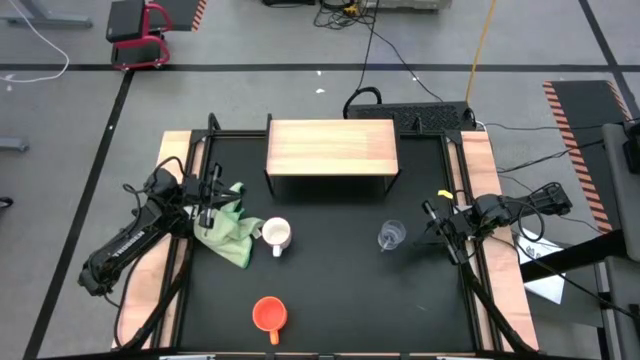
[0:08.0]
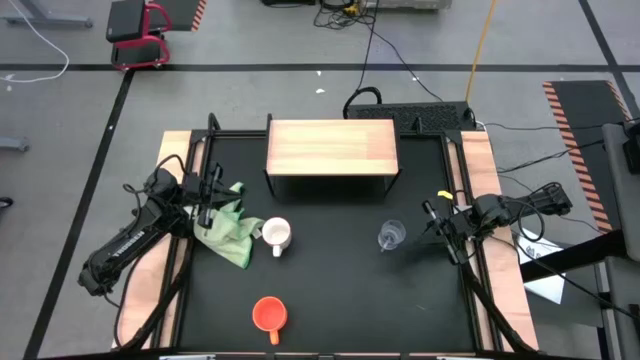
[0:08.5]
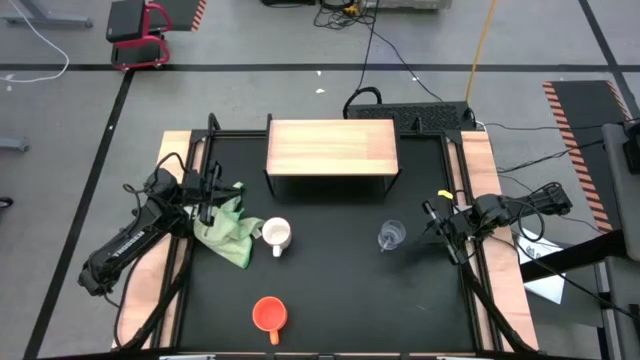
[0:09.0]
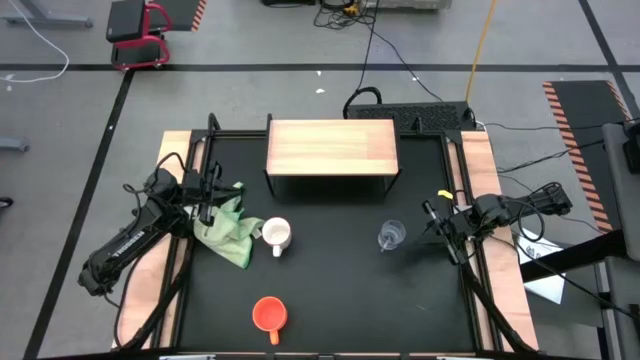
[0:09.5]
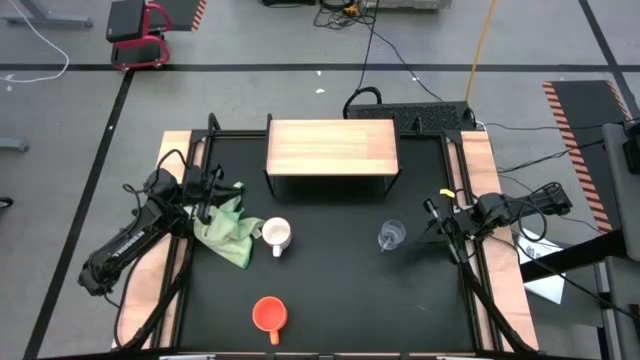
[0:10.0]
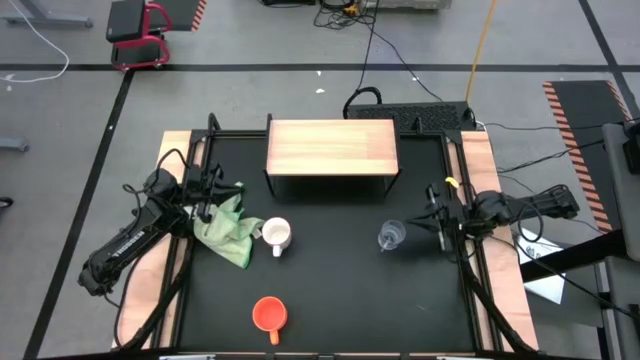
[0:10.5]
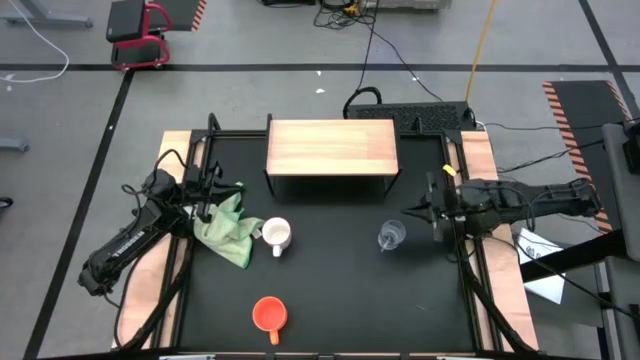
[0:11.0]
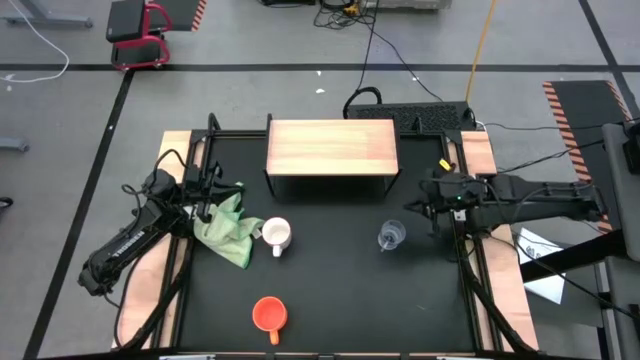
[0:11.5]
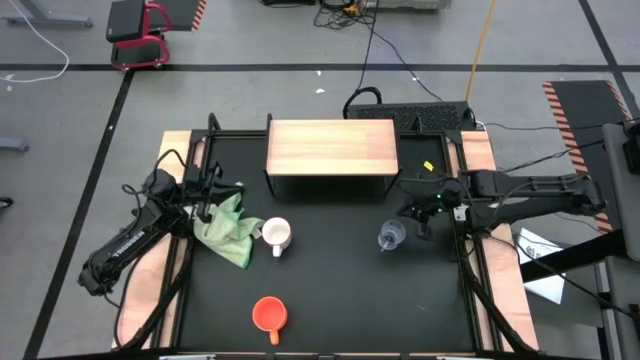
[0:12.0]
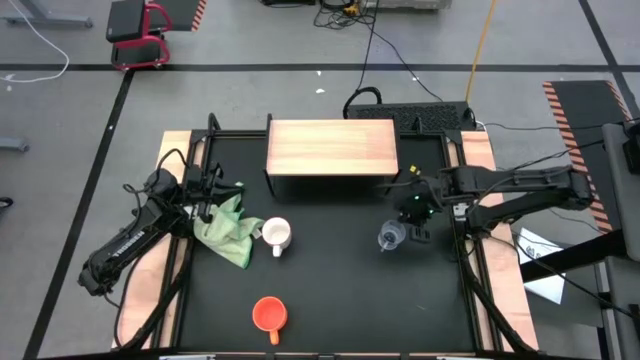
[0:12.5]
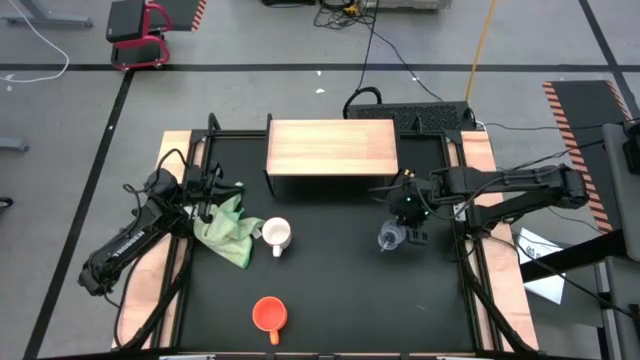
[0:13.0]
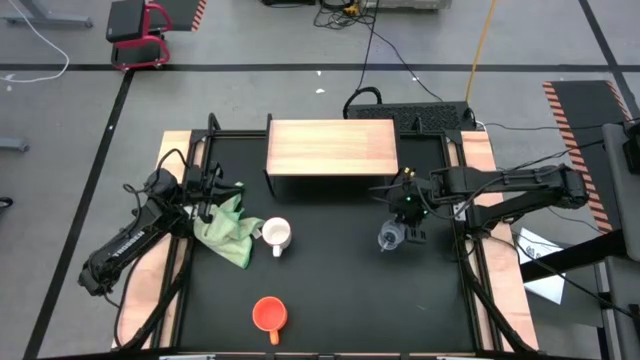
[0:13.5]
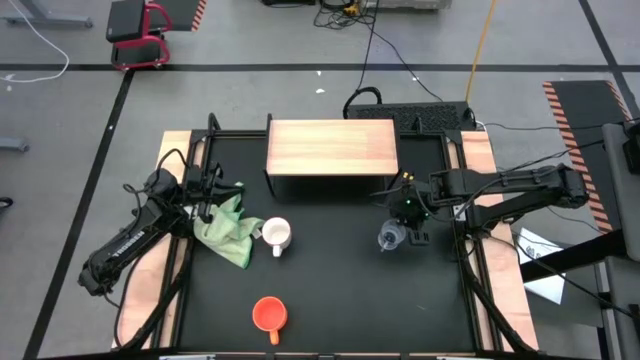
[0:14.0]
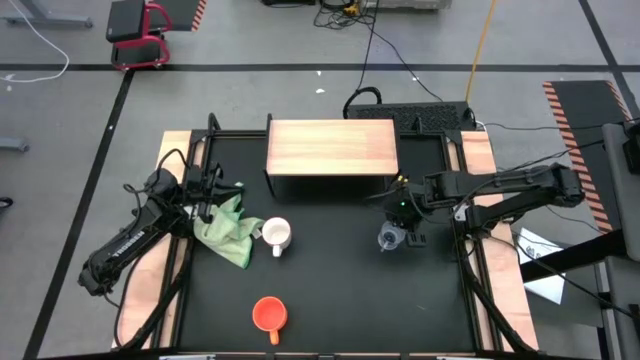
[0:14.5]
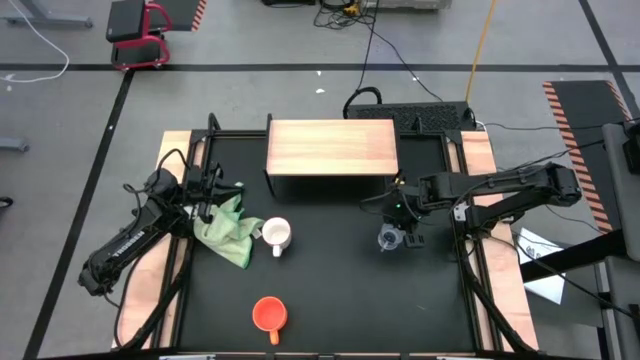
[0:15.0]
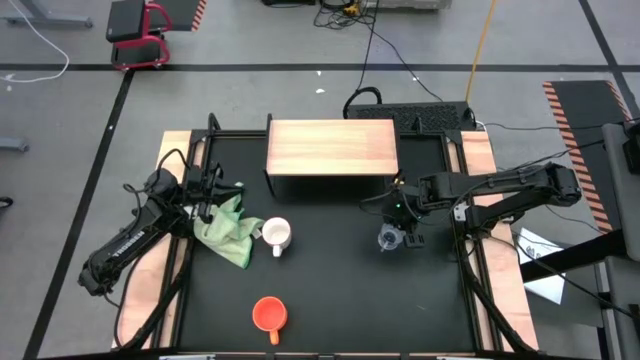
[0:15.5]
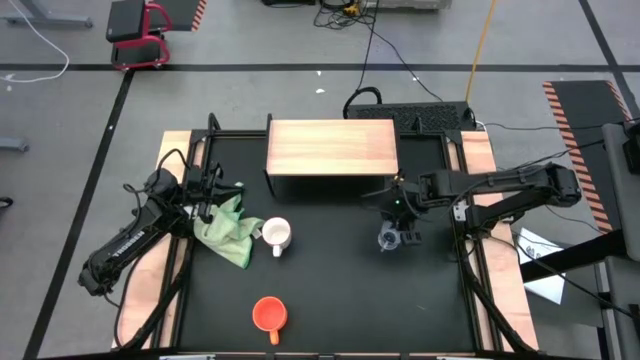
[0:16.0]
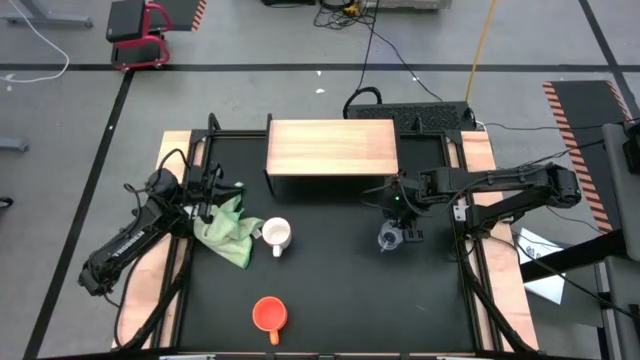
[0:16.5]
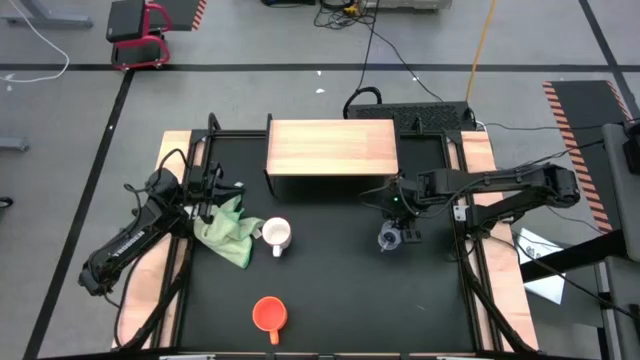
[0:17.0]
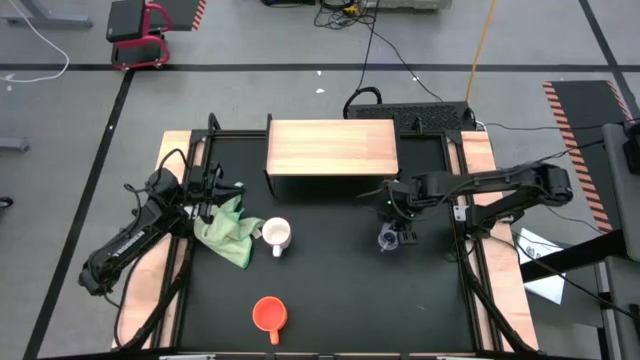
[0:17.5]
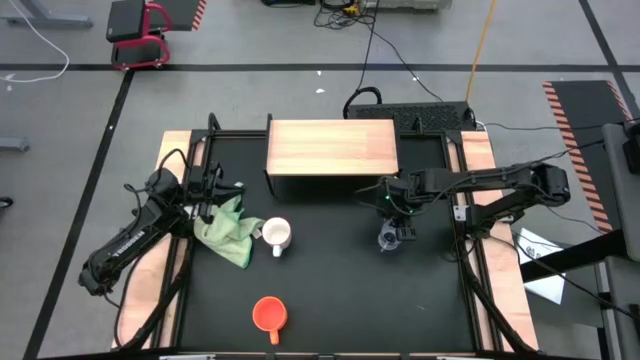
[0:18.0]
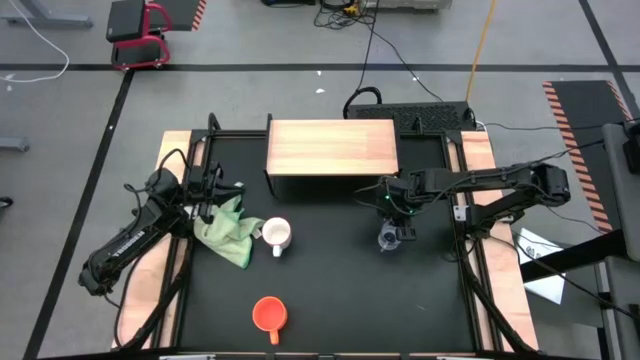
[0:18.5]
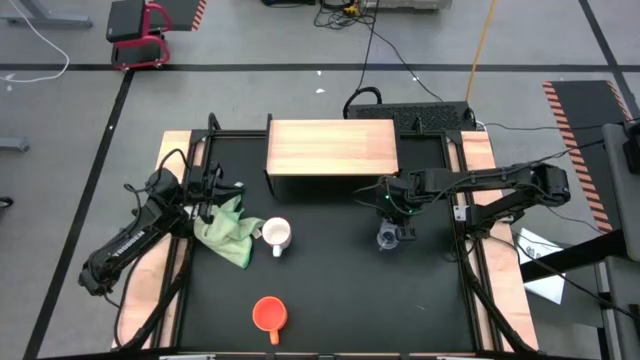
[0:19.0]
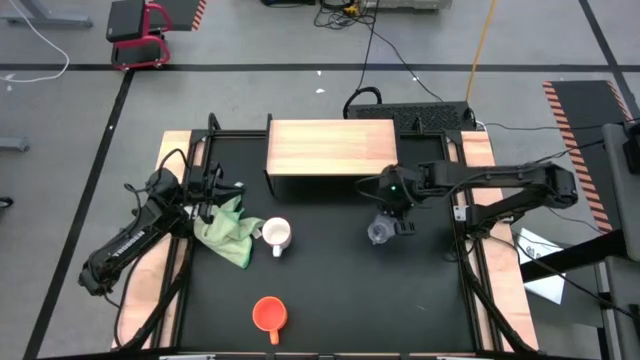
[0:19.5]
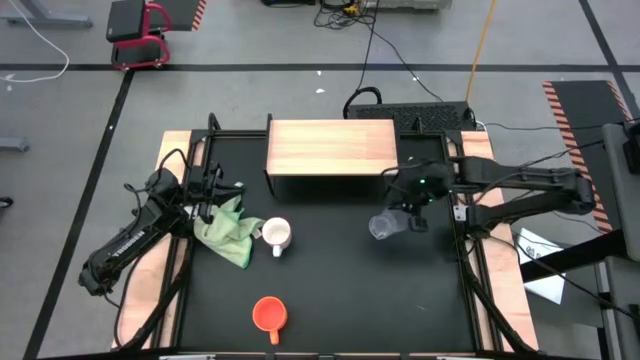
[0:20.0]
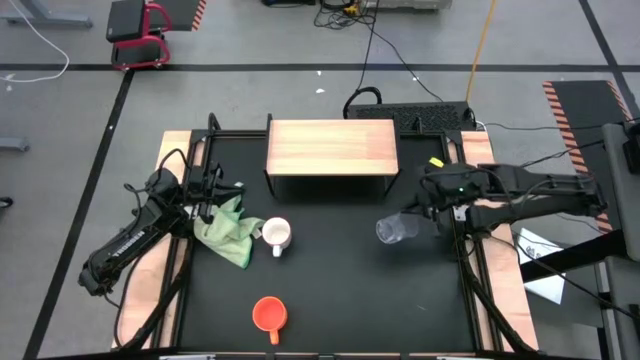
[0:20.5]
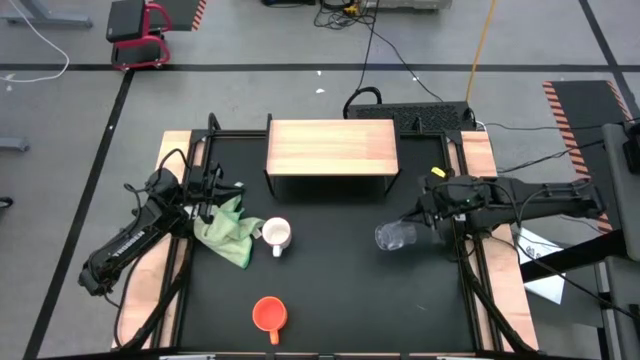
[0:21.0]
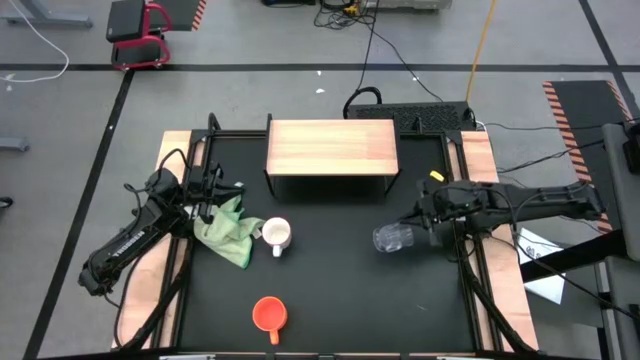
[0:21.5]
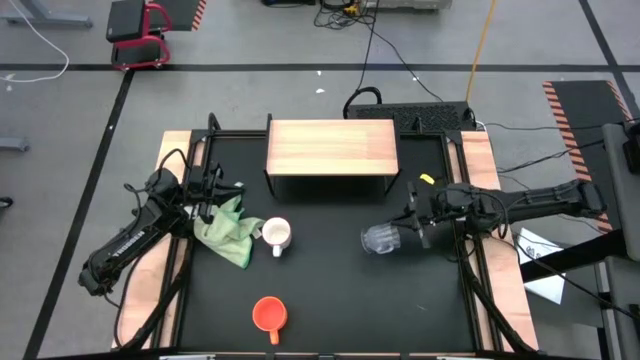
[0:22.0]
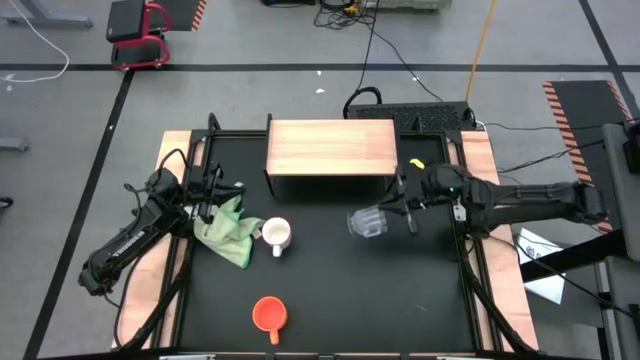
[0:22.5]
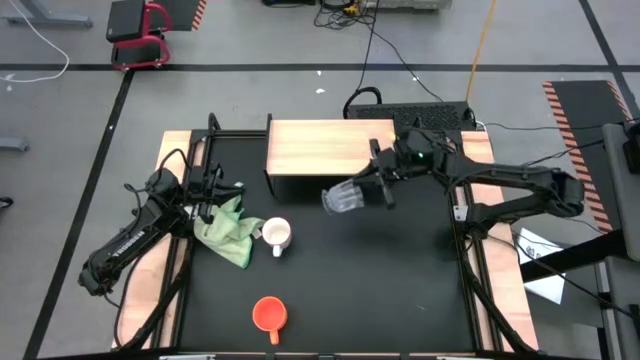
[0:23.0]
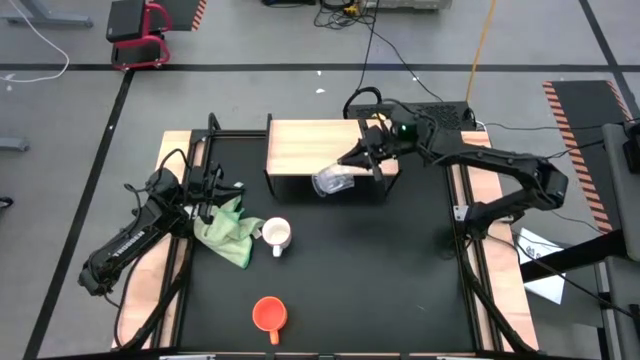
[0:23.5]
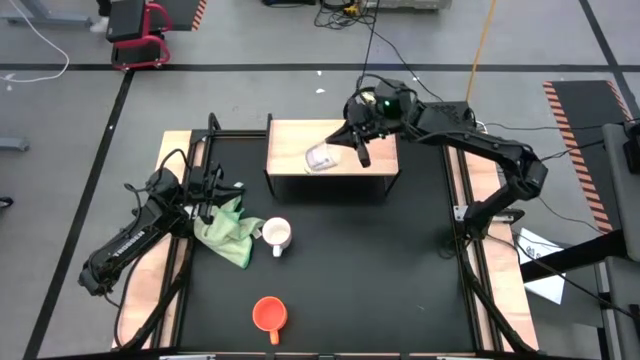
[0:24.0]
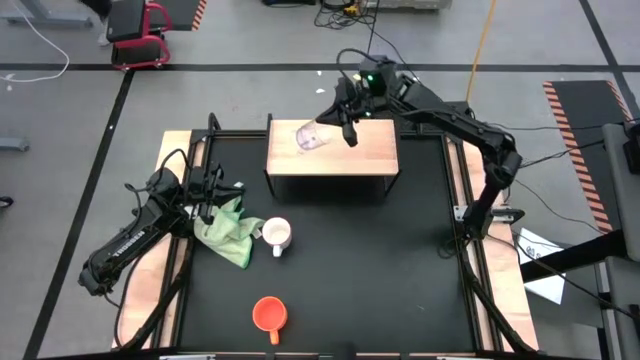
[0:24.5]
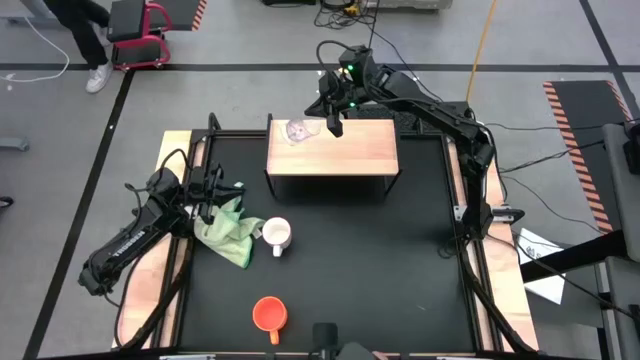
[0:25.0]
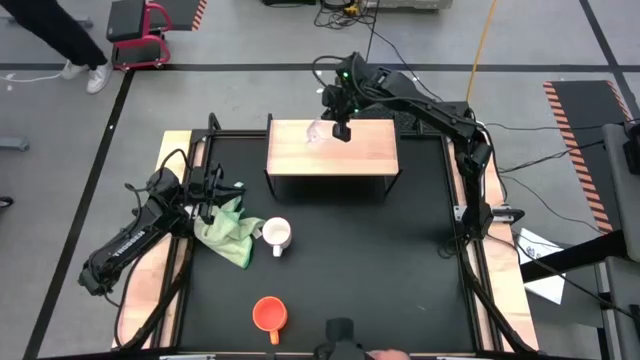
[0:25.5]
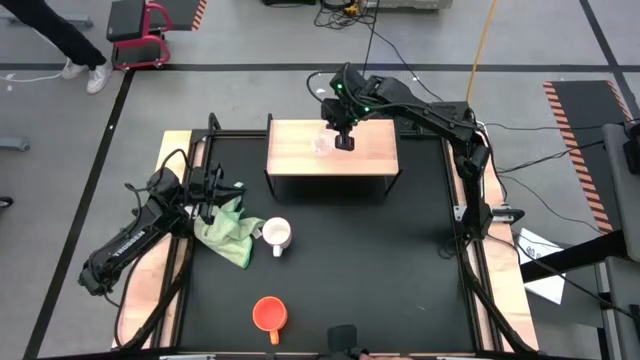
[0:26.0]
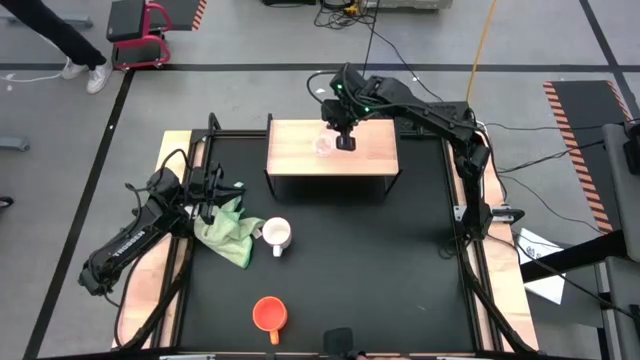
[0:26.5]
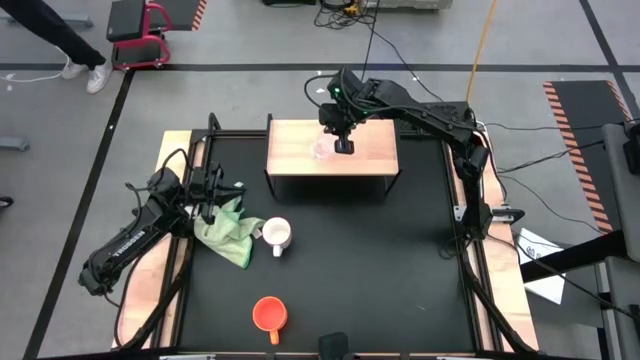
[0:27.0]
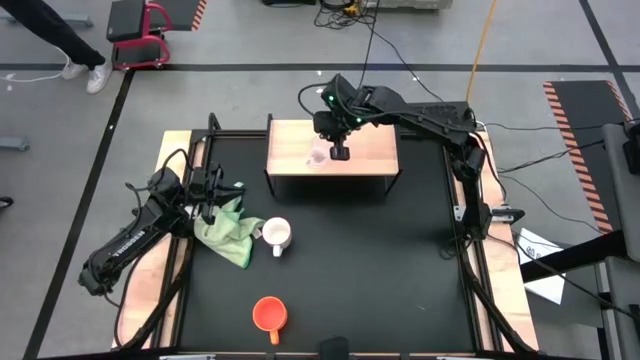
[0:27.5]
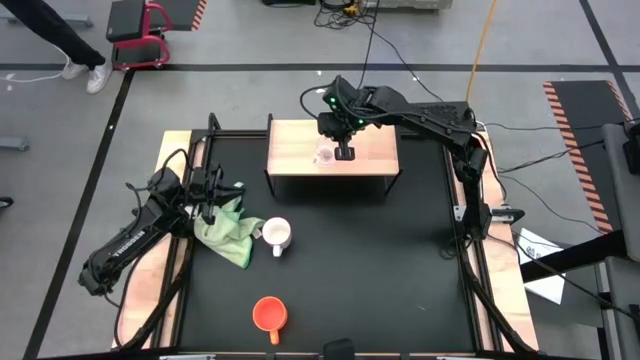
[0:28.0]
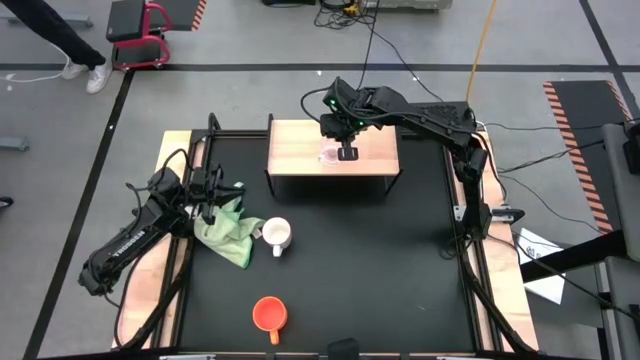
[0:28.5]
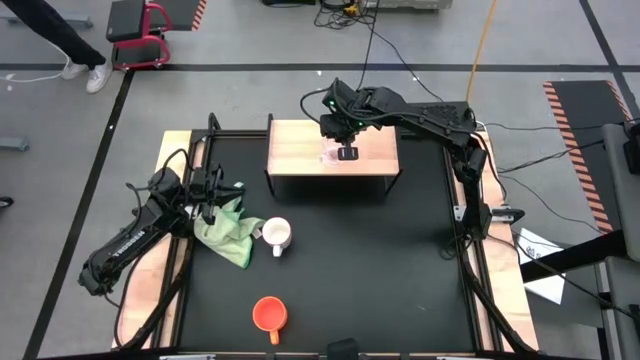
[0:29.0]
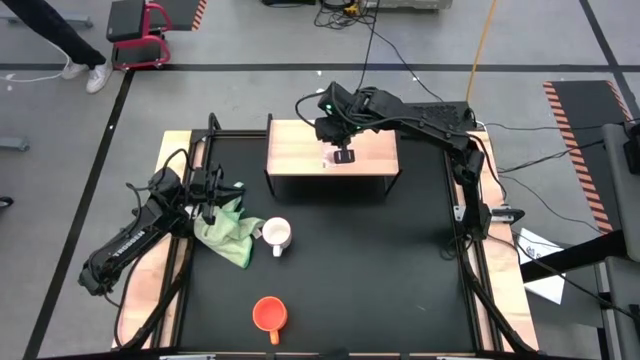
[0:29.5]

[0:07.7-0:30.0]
Task: Stack small to large cups/mugs on shelf
Put the transparent mug on the shelf
